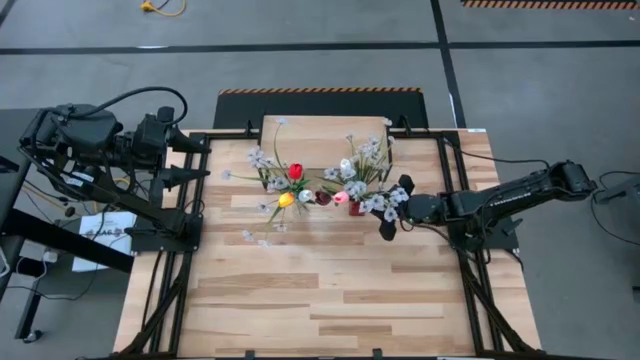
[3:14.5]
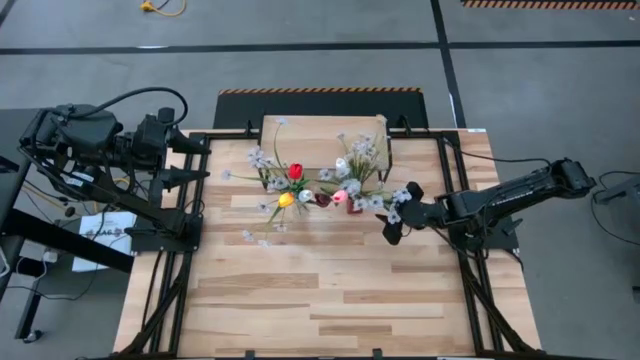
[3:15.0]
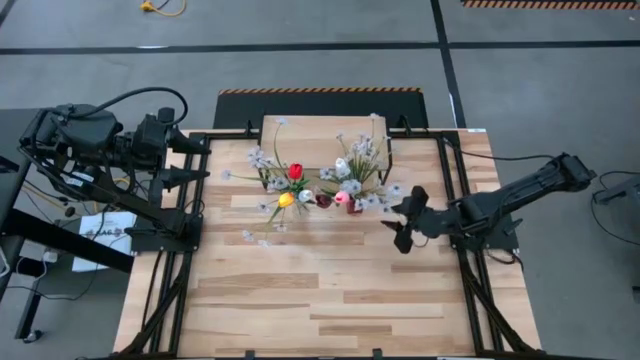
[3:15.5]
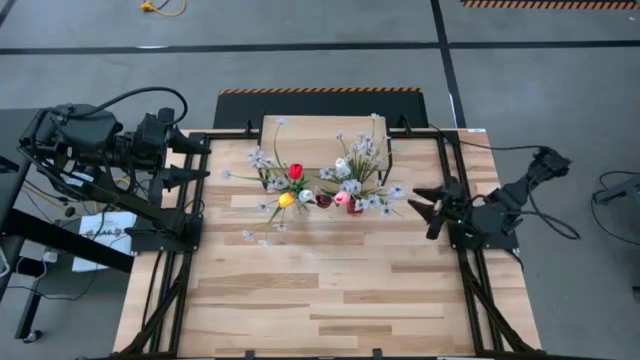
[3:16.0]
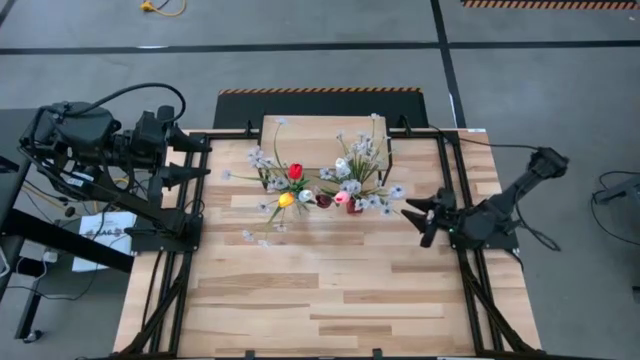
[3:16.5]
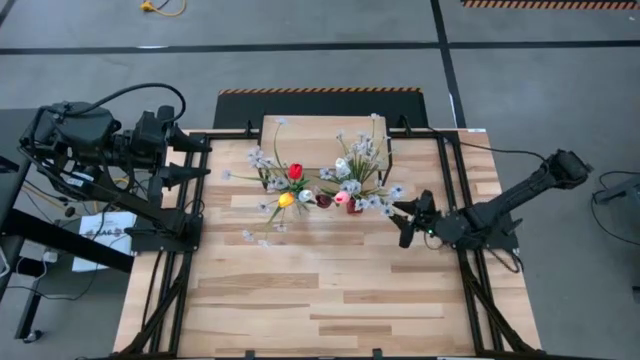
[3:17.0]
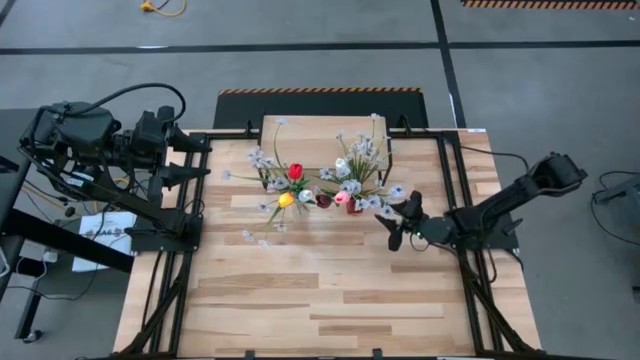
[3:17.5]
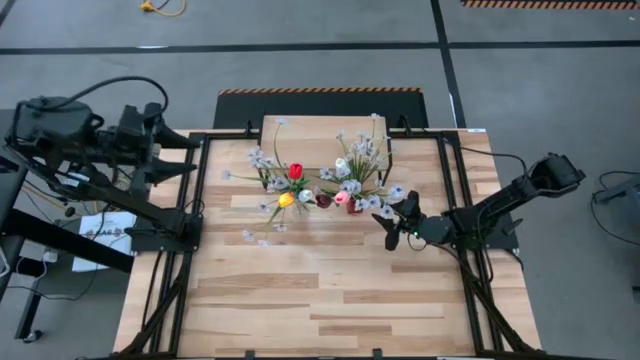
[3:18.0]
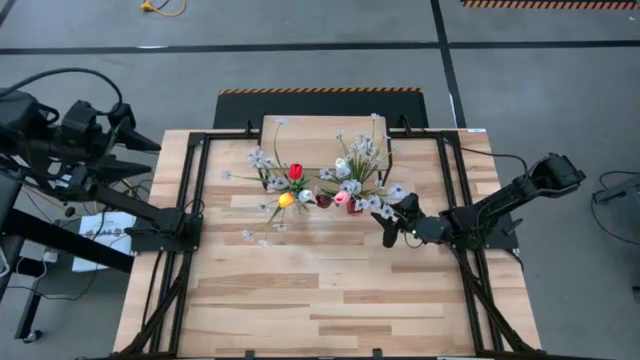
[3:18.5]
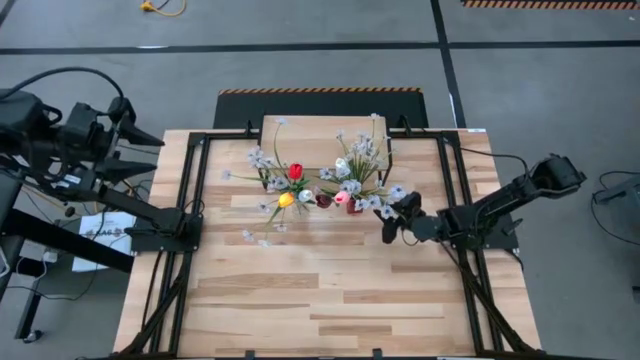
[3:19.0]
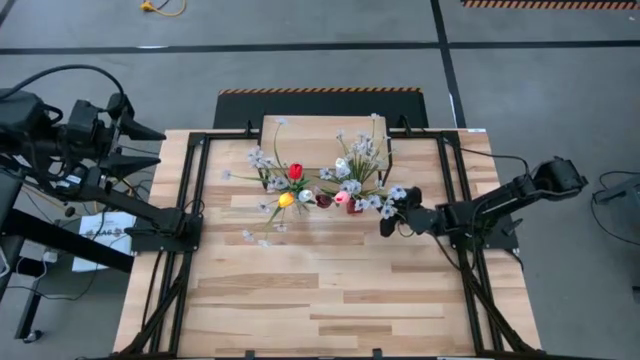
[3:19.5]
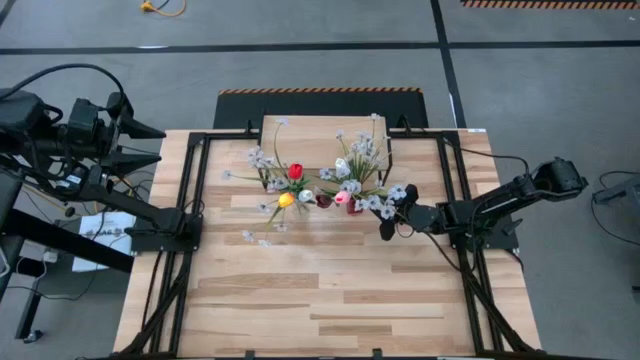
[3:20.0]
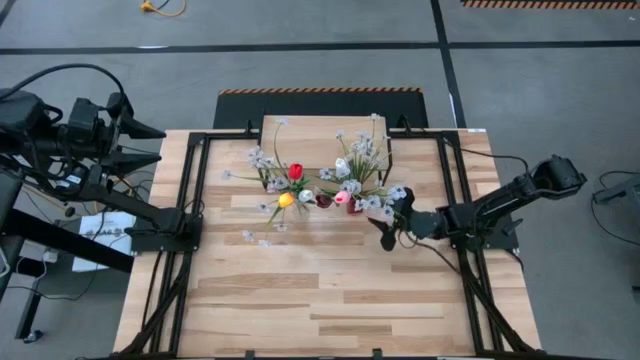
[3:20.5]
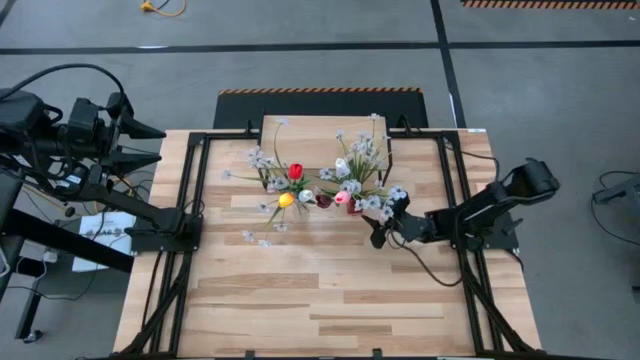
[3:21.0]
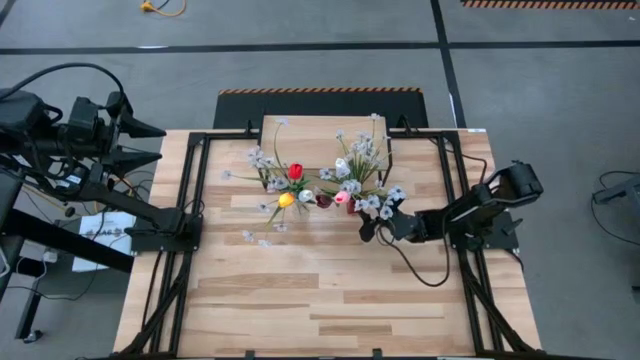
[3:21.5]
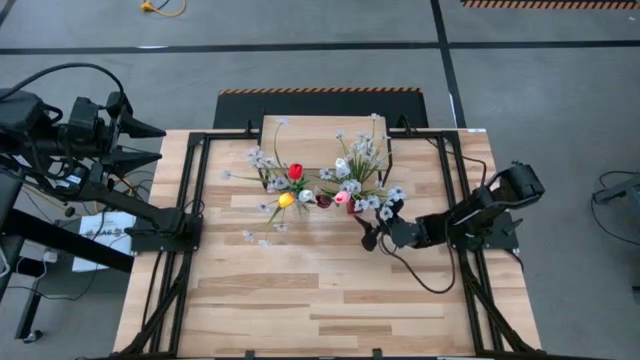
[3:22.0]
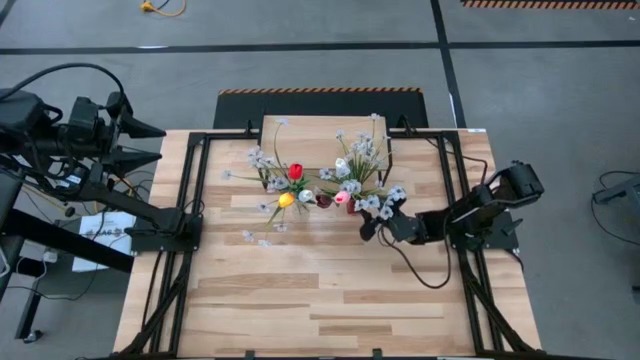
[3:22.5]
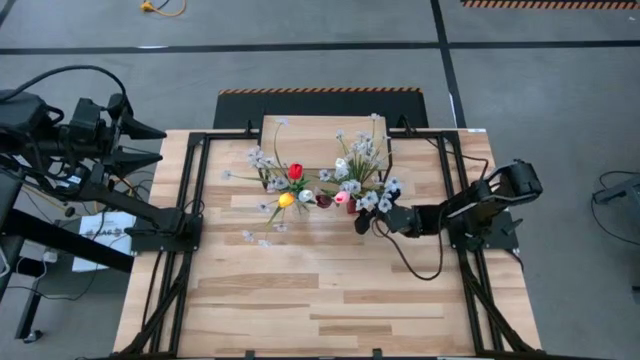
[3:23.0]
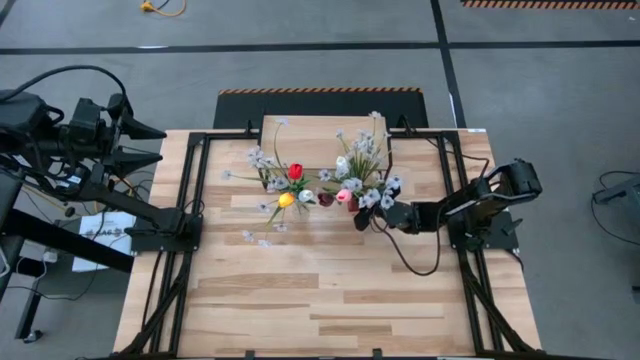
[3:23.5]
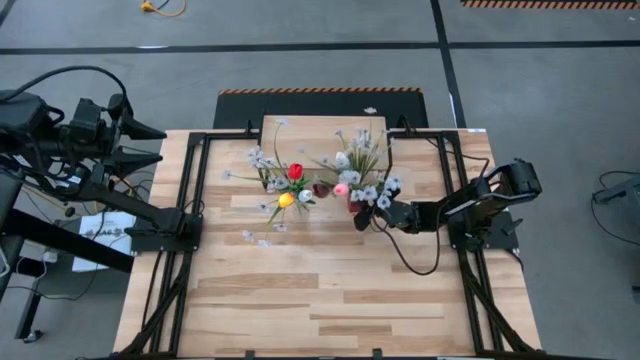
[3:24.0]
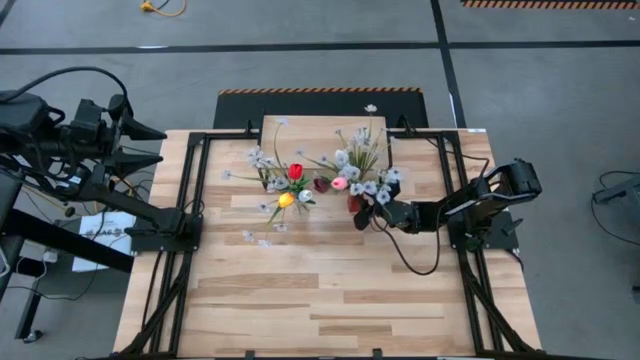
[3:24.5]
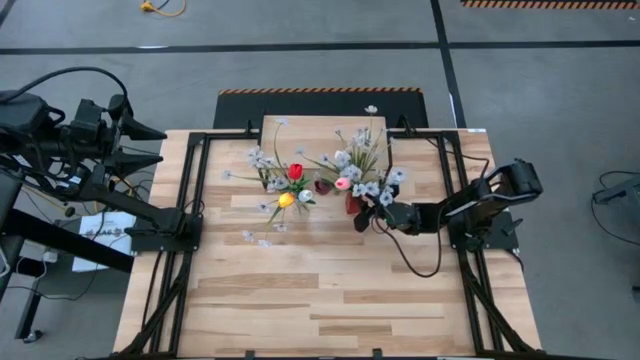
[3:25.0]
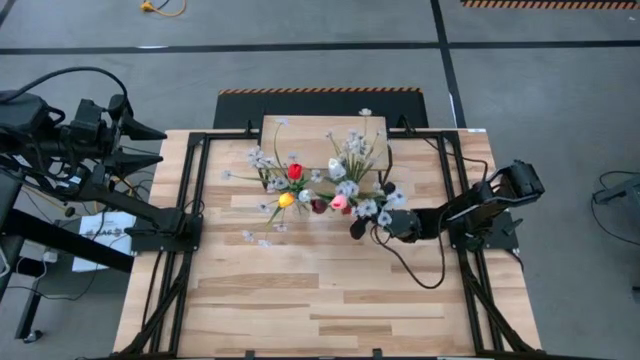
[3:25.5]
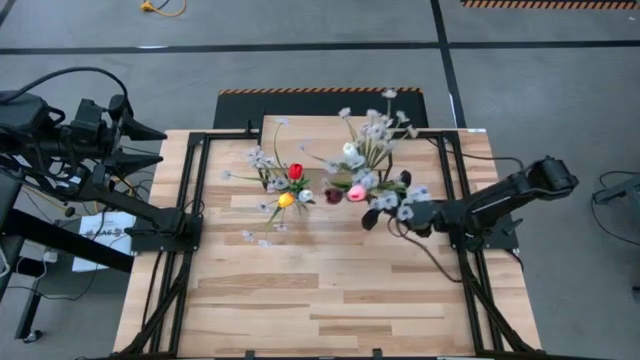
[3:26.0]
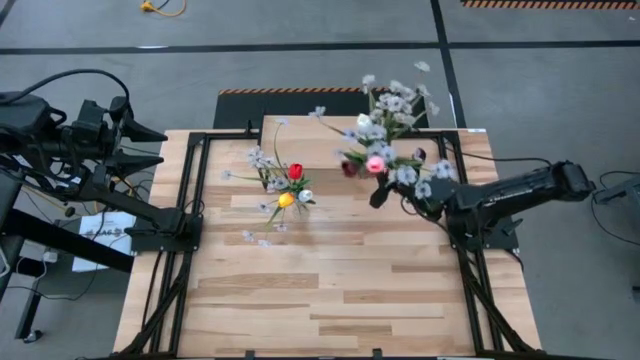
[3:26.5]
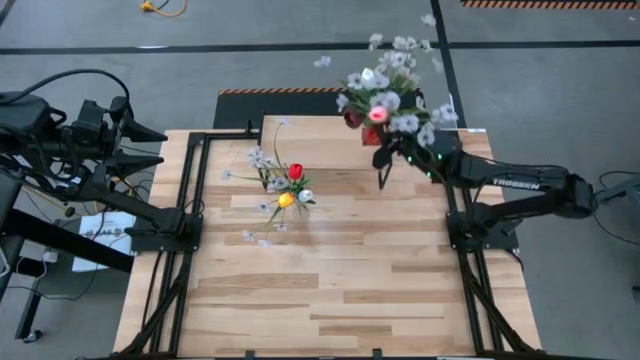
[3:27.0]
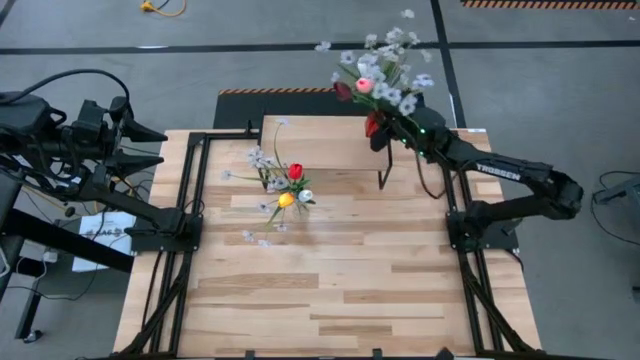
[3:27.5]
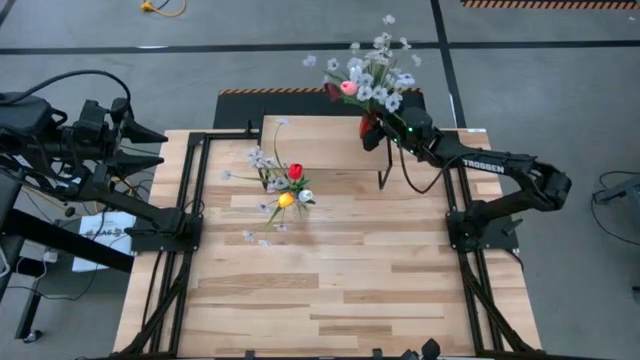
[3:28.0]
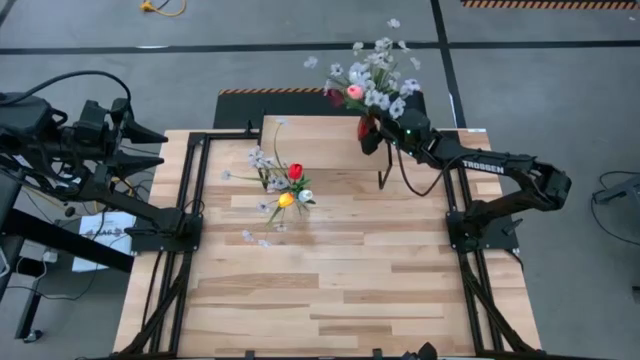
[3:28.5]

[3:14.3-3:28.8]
Task: Pick and place flowers into a vace then onto a shelf
Put the red vase with flowers on the shelf

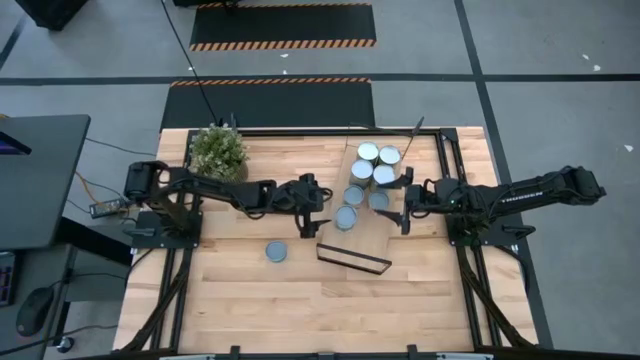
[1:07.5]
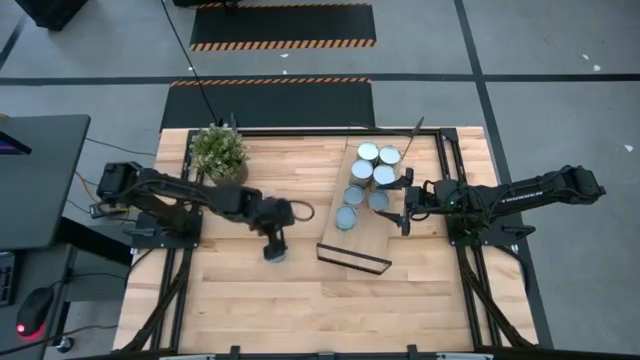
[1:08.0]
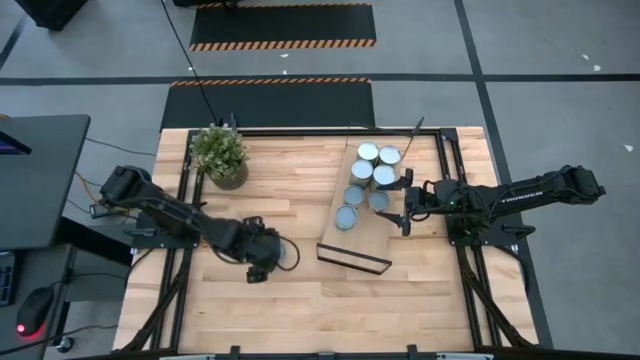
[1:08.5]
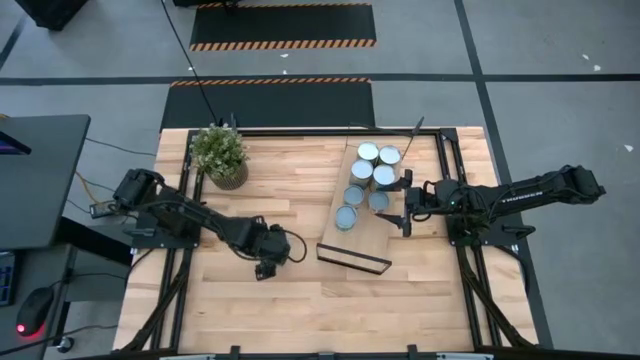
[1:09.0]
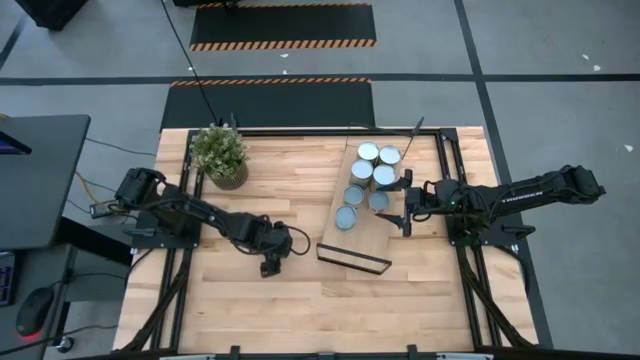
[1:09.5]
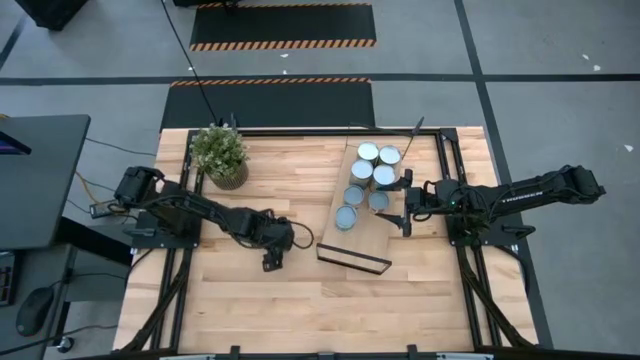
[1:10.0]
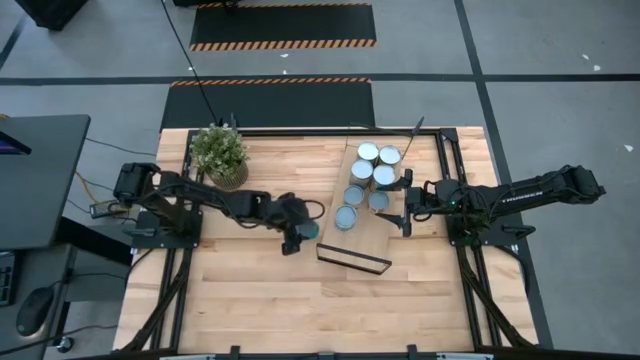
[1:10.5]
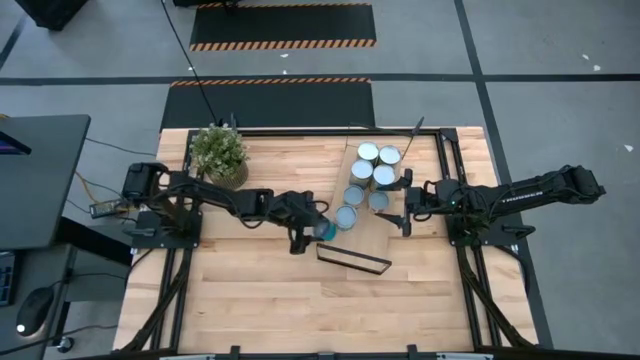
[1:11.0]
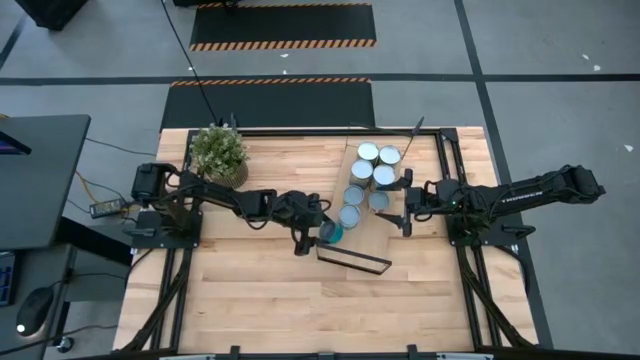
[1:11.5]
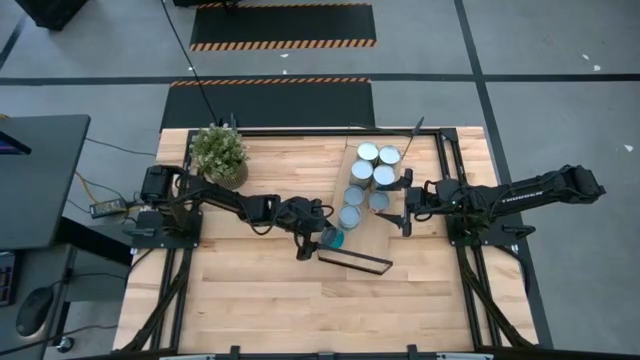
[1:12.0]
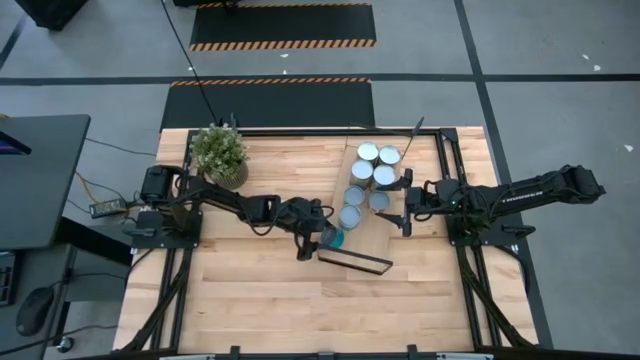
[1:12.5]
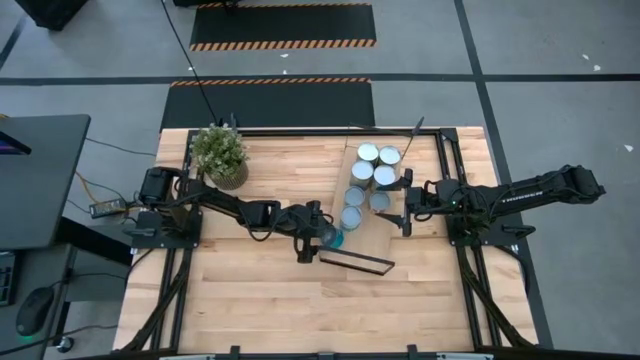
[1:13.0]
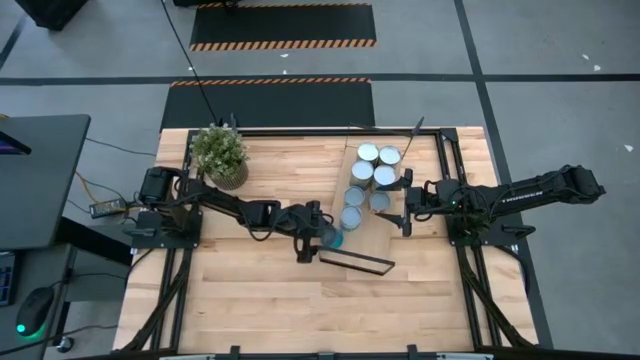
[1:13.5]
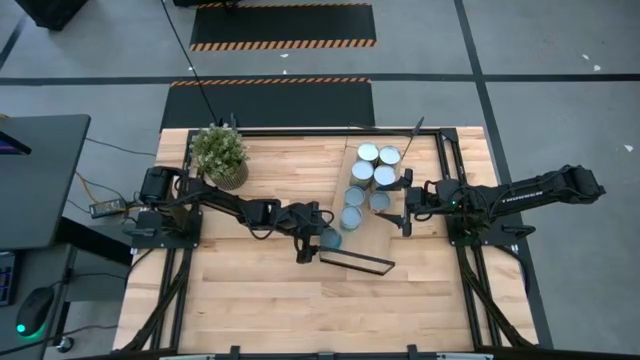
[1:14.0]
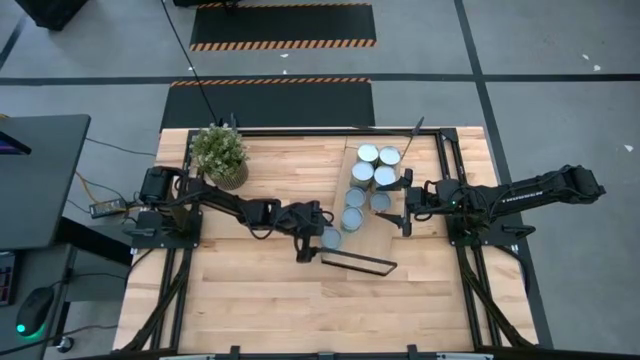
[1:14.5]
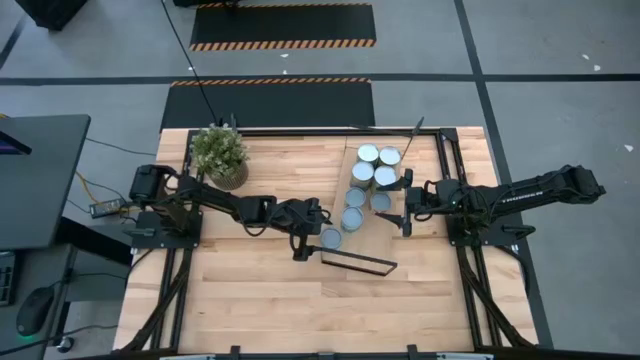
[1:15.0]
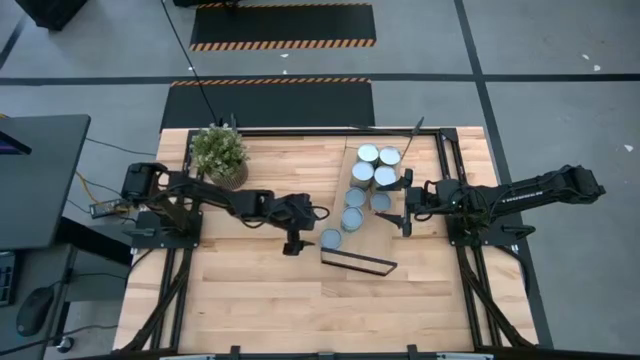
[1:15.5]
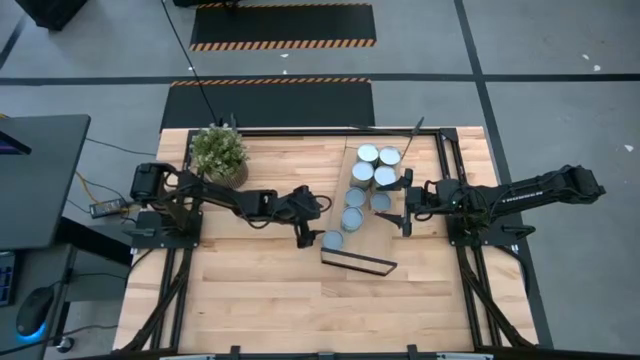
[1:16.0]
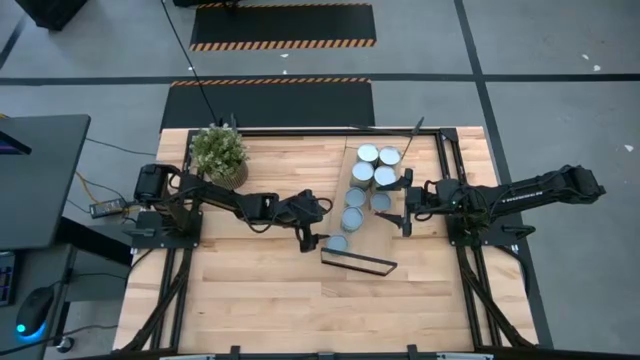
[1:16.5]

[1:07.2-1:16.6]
Task: Pick and place cans onto a shelf
Put the canned tuna on the shelf
